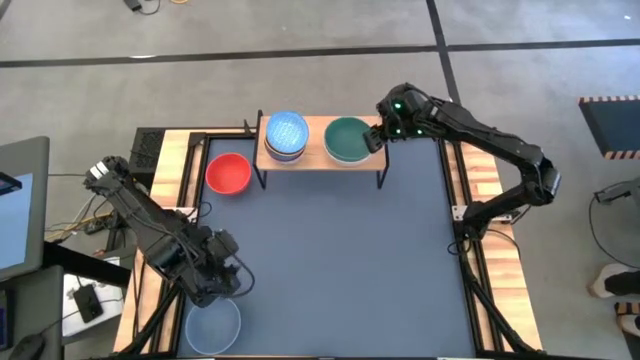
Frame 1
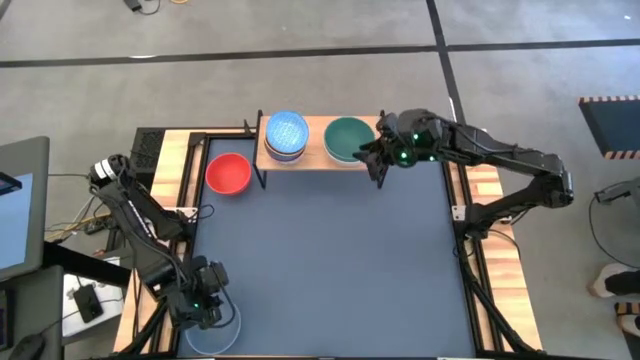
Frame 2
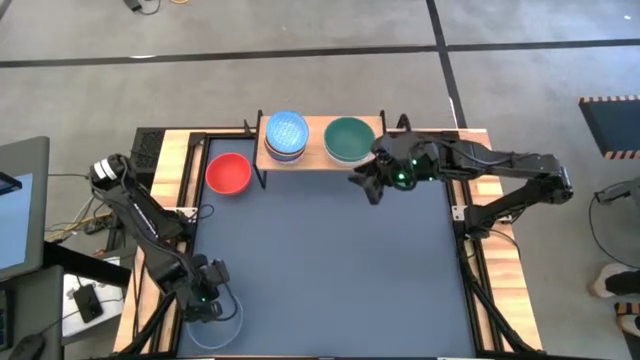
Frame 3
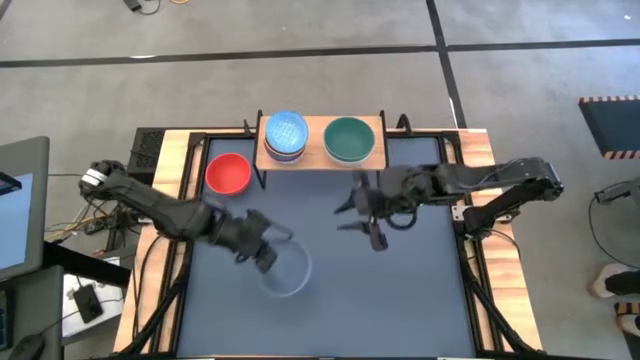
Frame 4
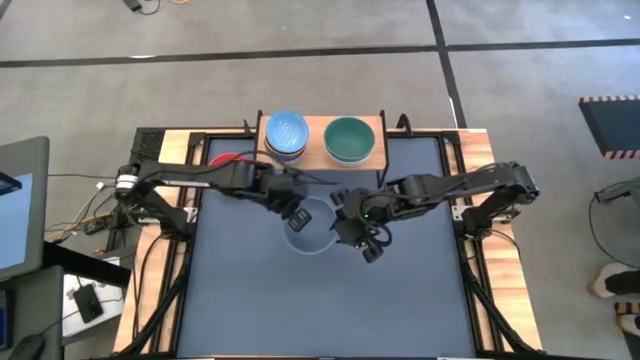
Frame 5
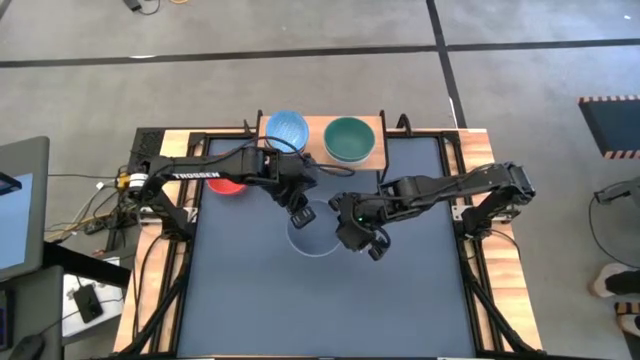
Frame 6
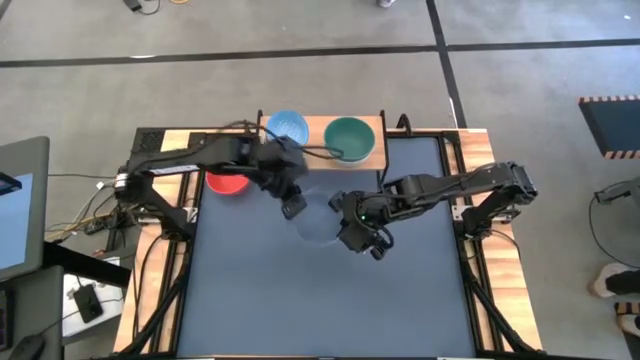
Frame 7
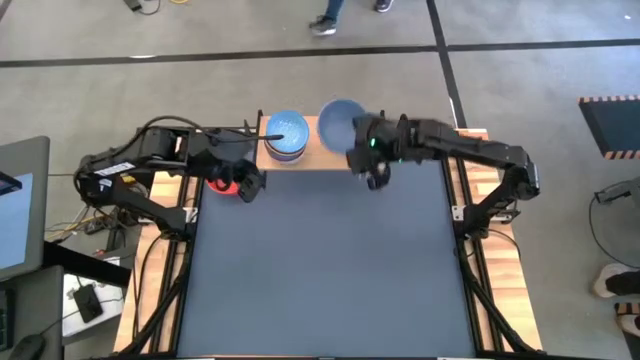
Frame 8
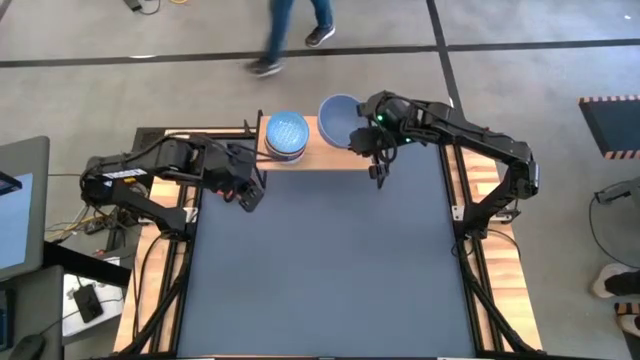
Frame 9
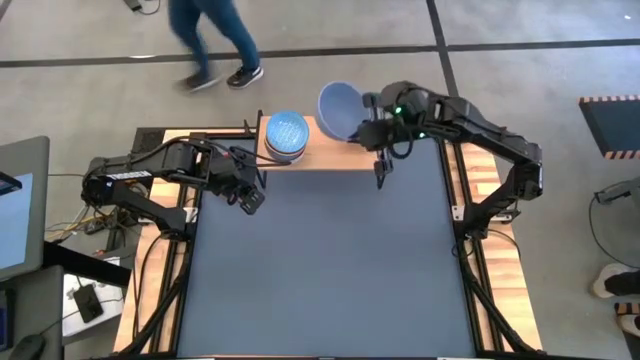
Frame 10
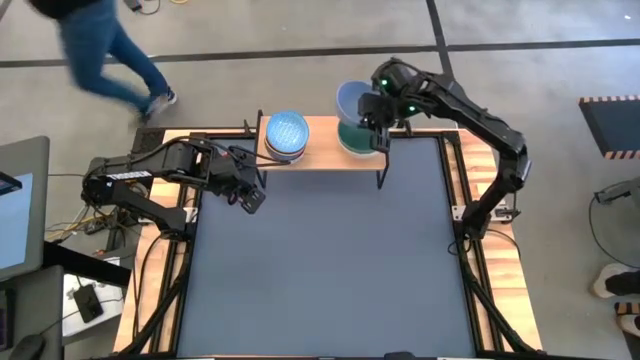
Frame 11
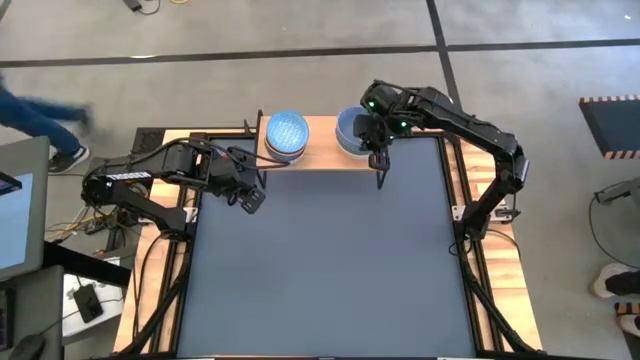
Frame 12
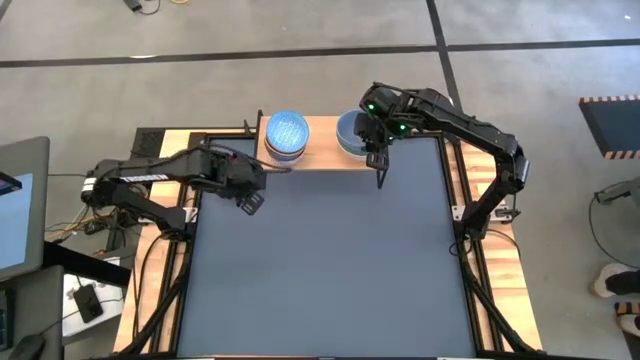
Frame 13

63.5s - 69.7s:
Task: Place and stack bowls onto a shelf
Stack the gray bowl on the top of the green bowl on the shelf

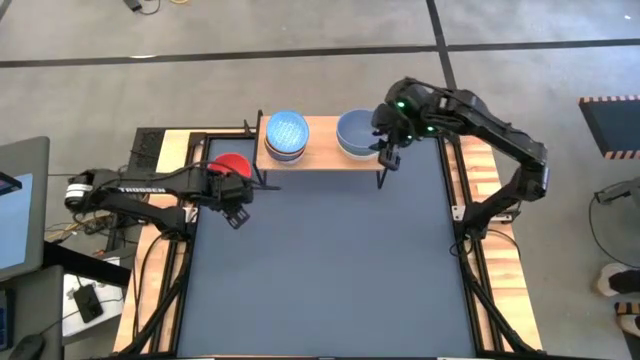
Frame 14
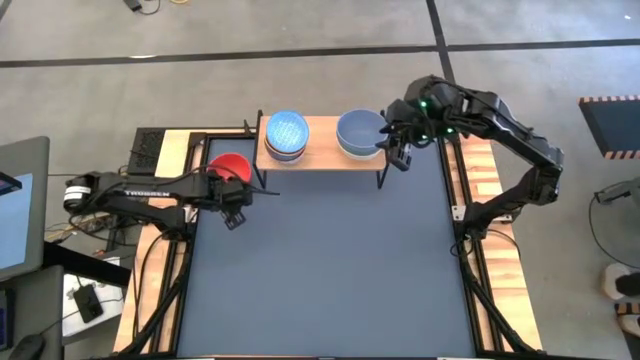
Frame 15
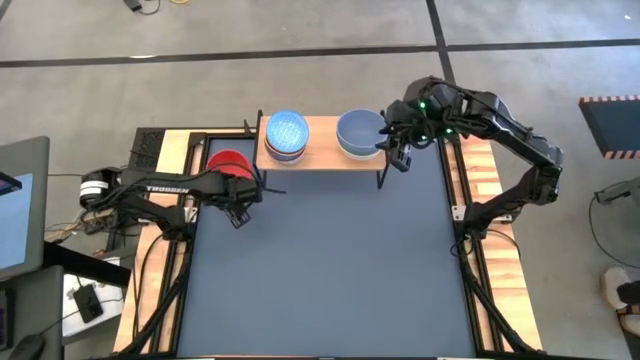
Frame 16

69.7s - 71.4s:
Stack the orange bowl on the top of the green bowl on the shelf

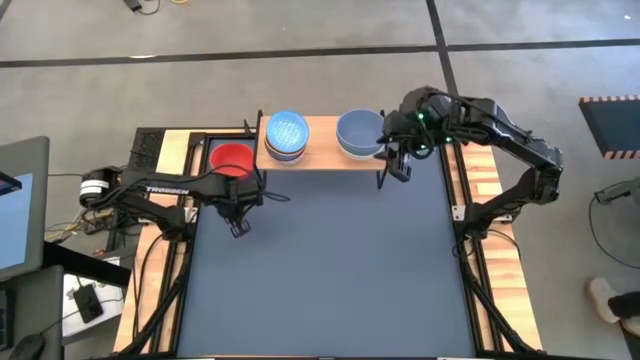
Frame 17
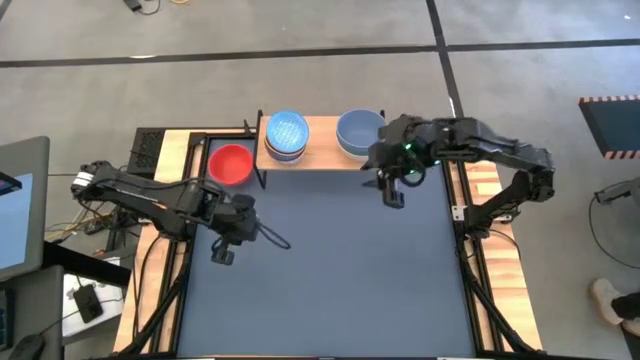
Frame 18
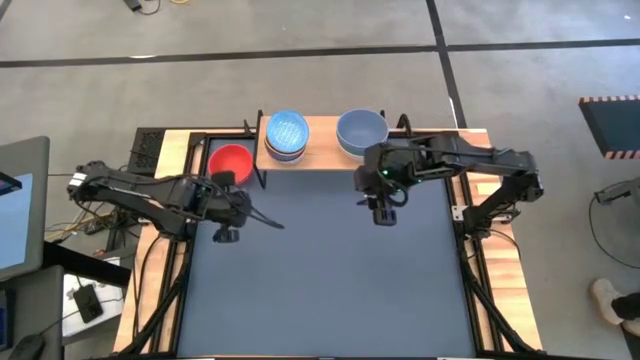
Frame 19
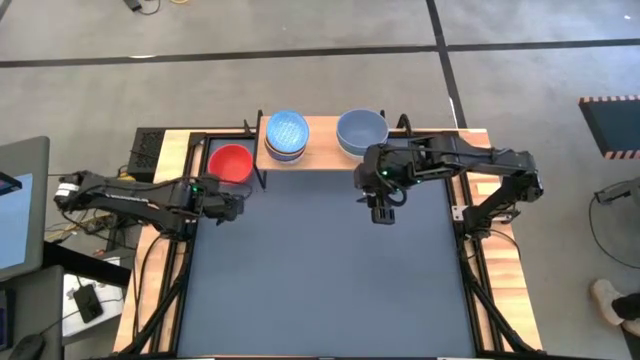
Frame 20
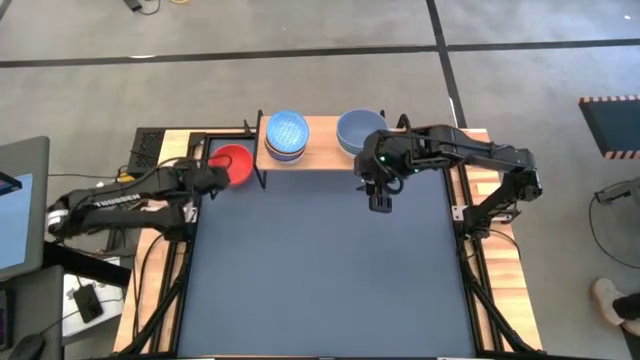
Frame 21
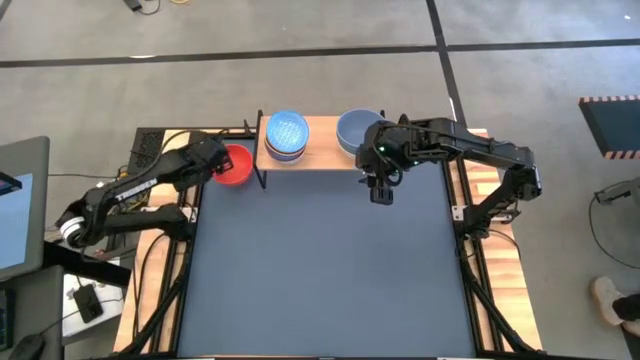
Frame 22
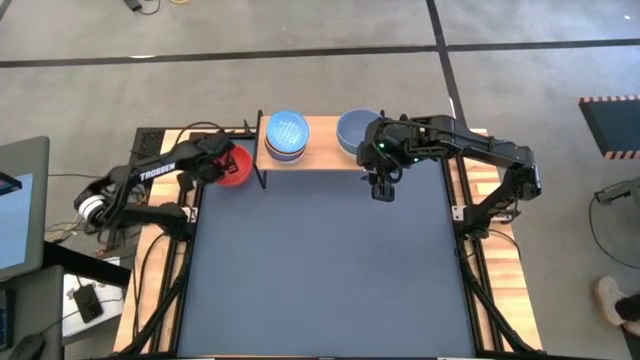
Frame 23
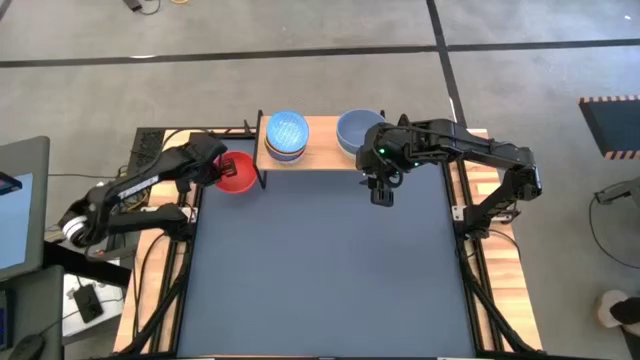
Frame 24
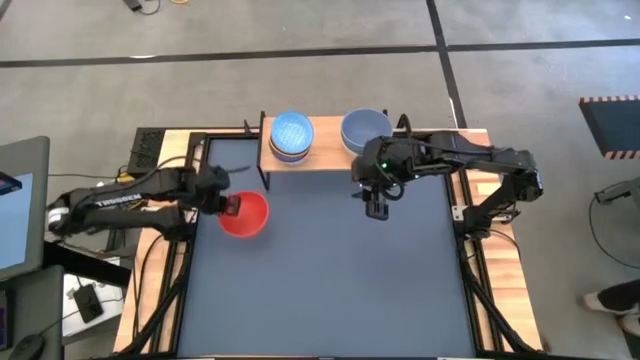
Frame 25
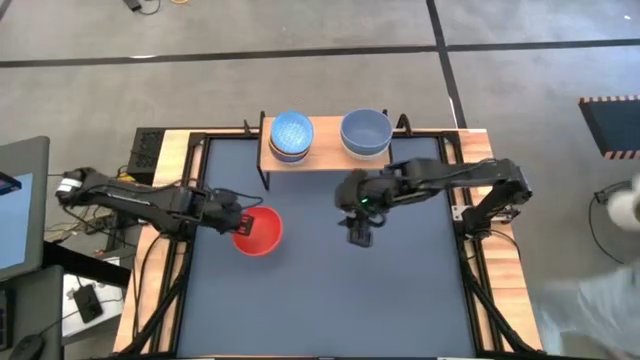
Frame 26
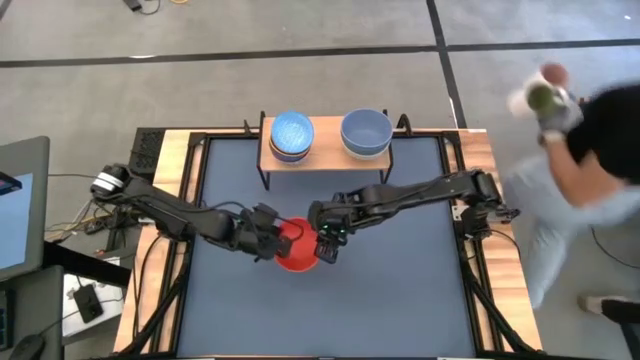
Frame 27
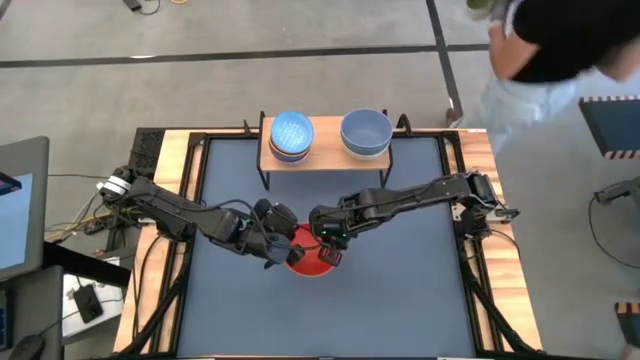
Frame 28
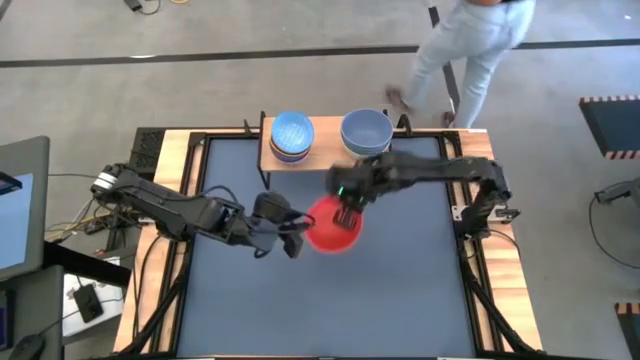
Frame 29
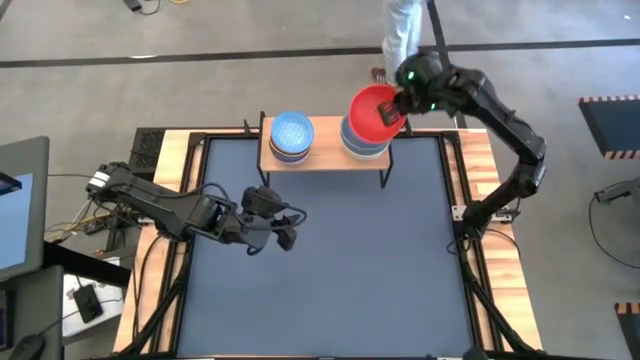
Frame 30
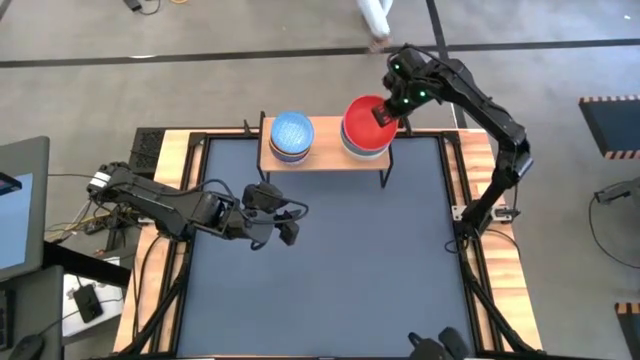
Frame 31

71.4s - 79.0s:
Stack the orange bowl on the top of the green bowl on the shelf

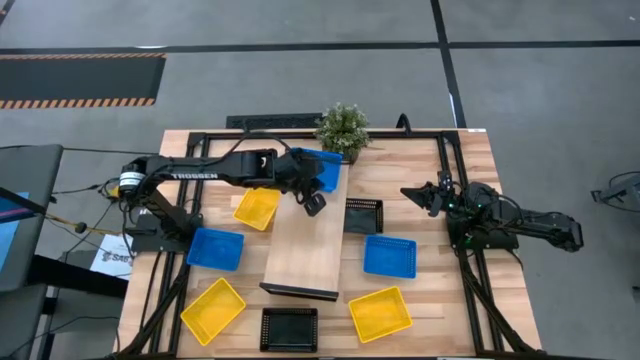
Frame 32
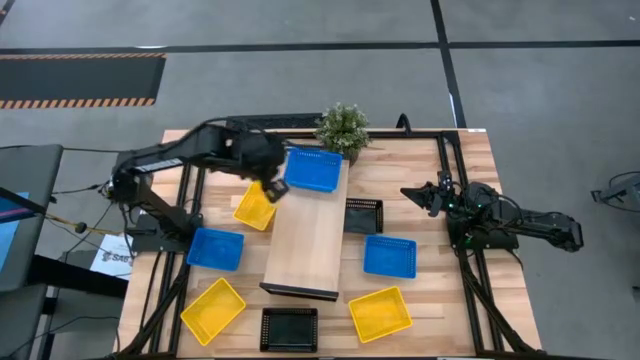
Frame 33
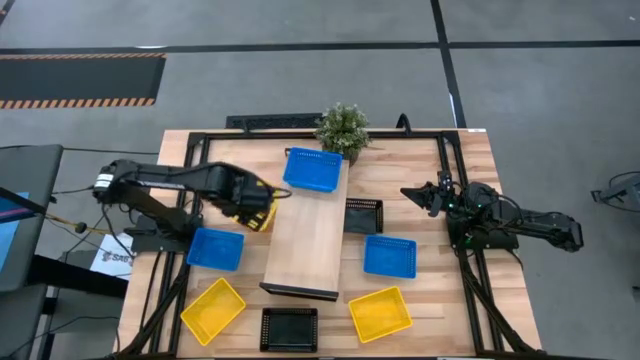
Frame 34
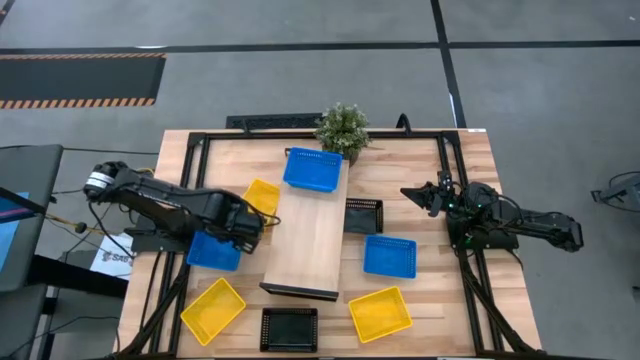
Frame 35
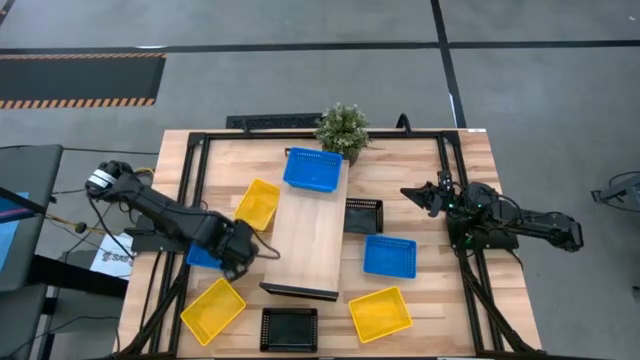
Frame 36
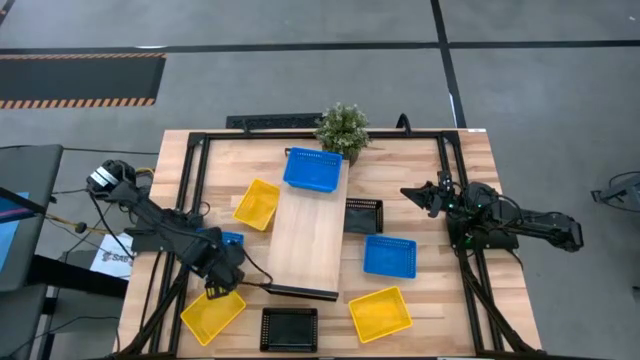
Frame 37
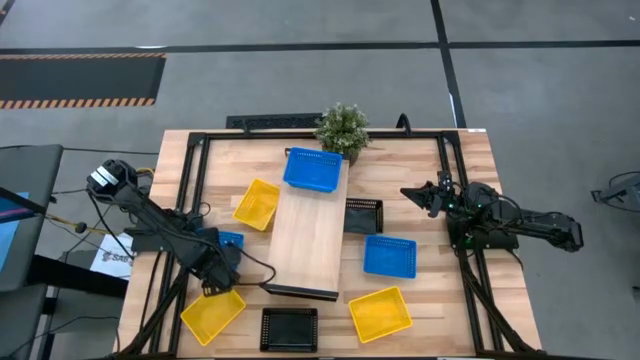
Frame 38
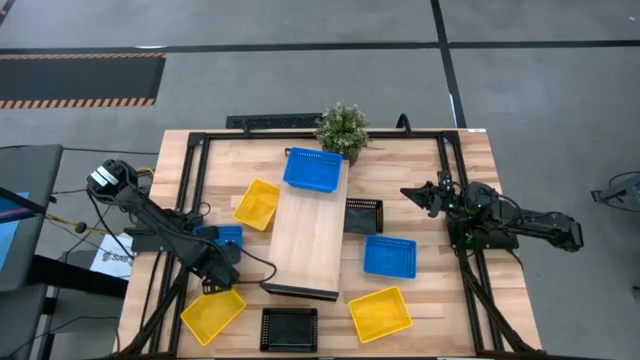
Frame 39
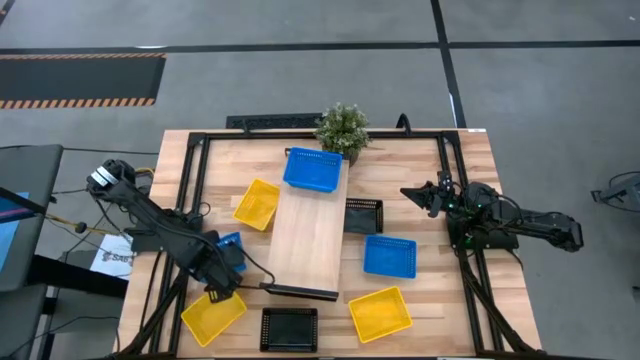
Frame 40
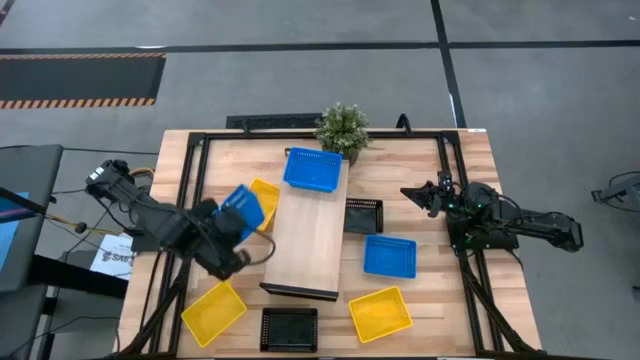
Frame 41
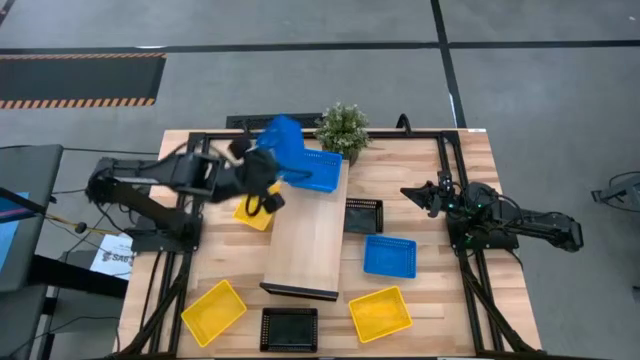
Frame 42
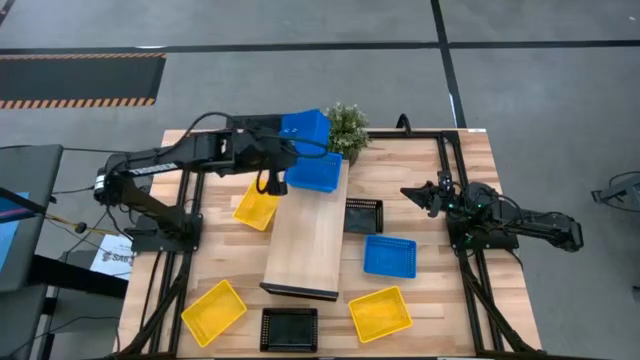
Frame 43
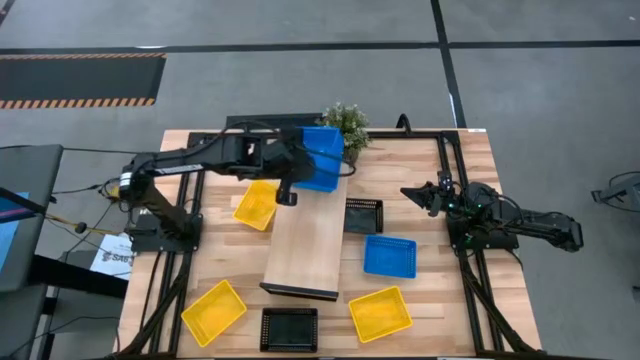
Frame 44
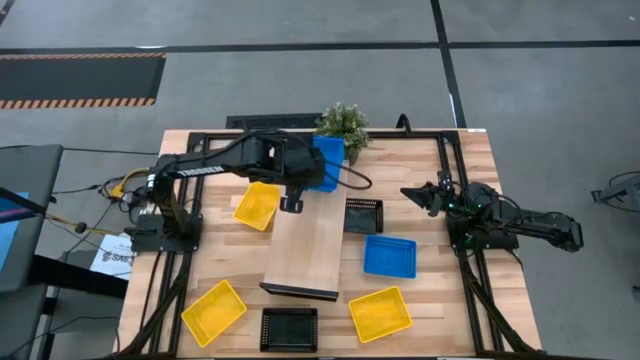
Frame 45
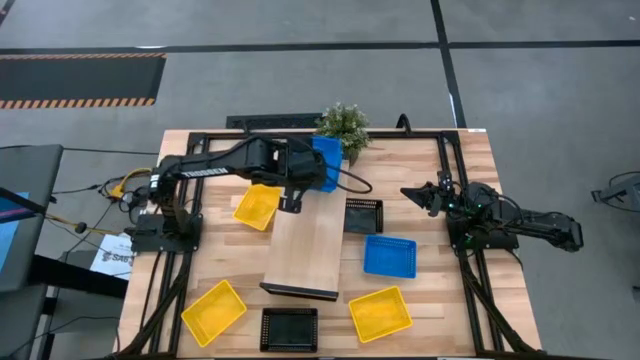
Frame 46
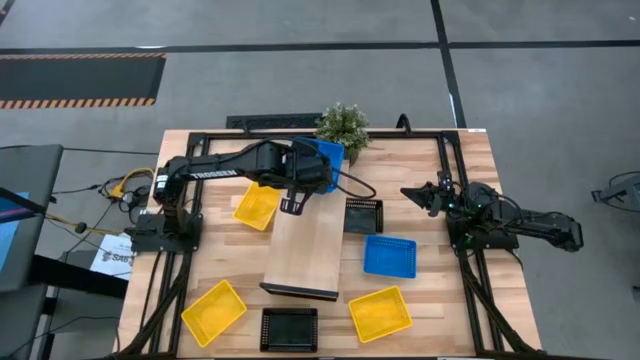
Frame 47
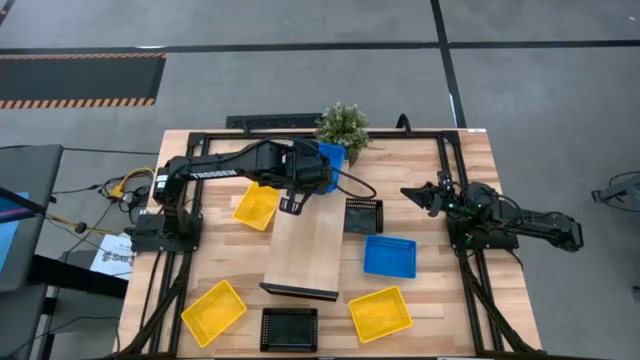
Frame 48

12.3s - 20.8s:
Task: Stack baskets on shelf by color
Stack the left blue basket on top of the blue basket on the shelf
